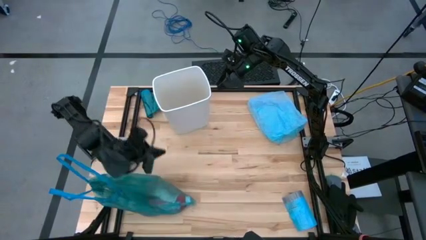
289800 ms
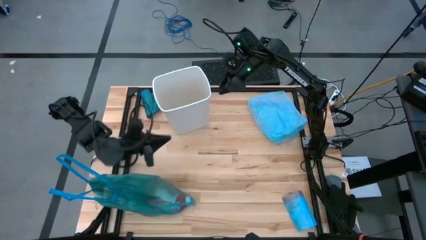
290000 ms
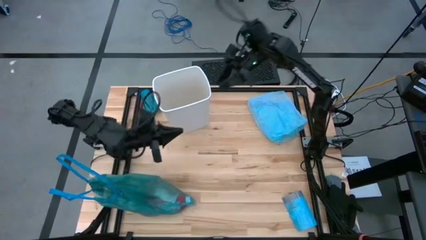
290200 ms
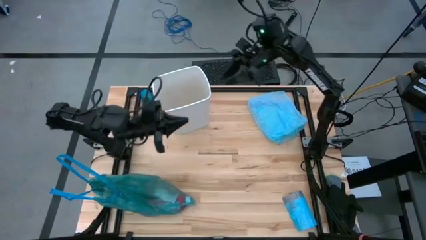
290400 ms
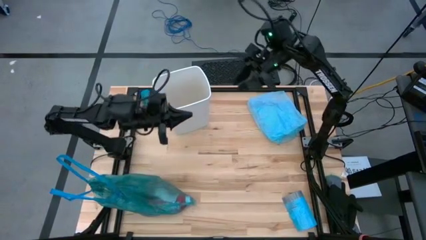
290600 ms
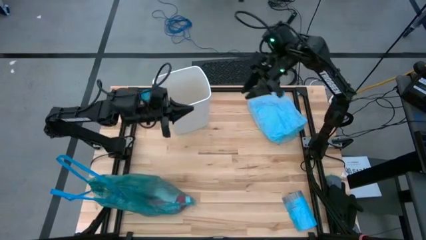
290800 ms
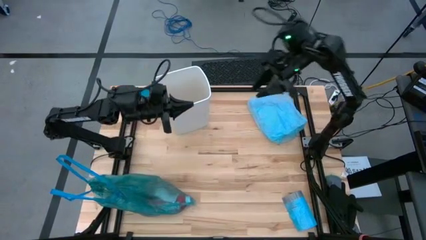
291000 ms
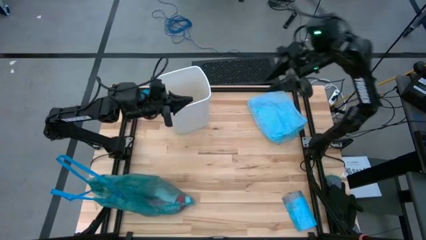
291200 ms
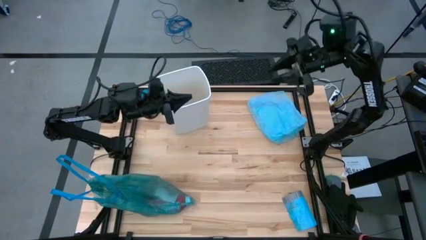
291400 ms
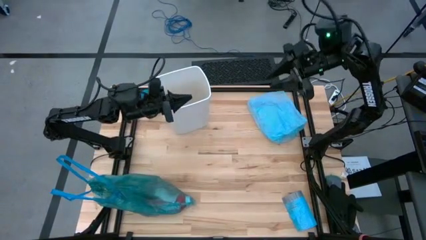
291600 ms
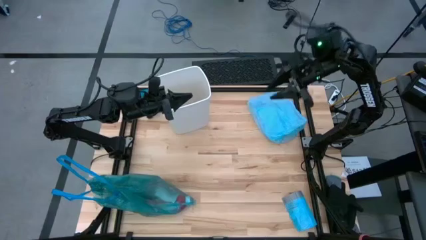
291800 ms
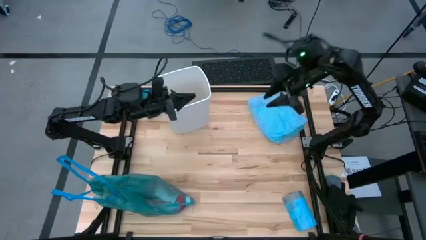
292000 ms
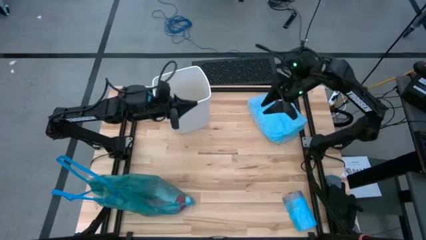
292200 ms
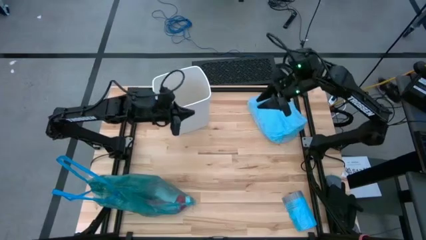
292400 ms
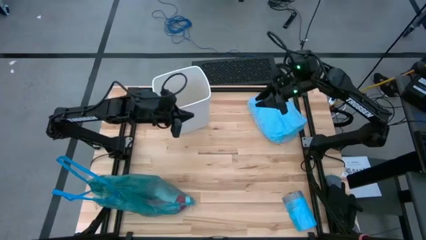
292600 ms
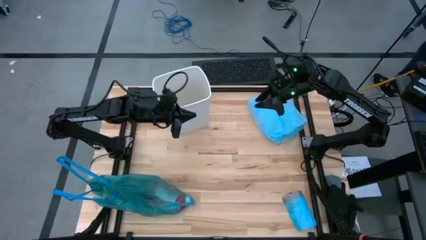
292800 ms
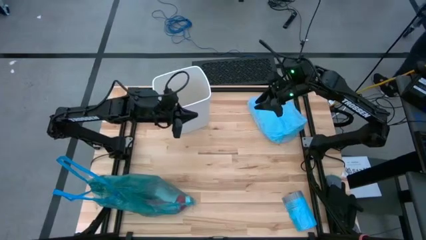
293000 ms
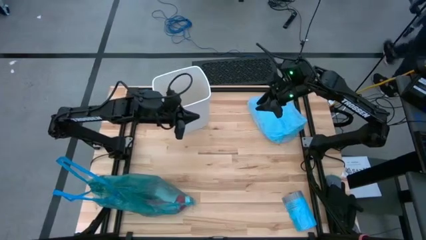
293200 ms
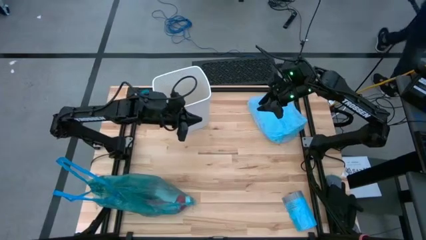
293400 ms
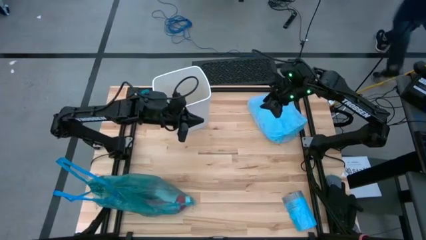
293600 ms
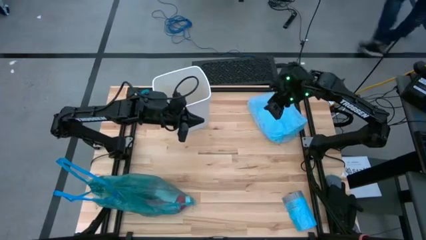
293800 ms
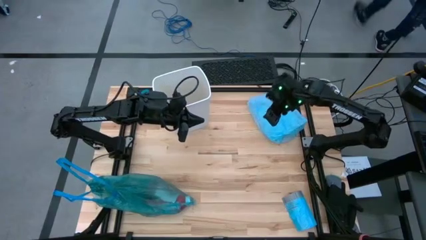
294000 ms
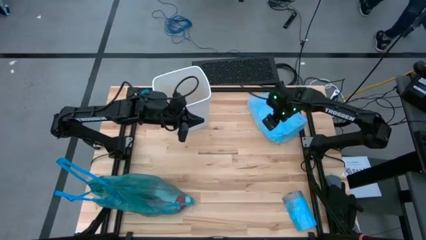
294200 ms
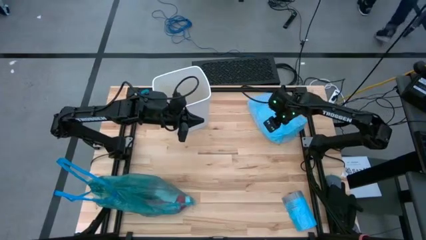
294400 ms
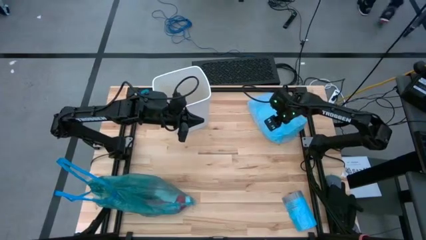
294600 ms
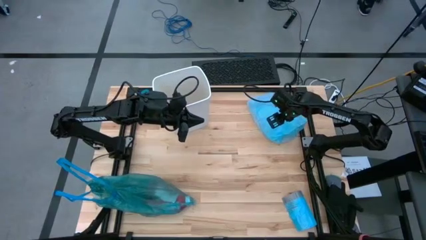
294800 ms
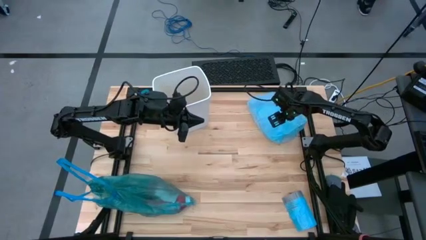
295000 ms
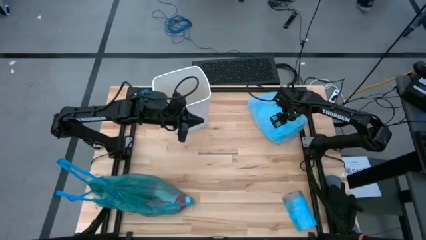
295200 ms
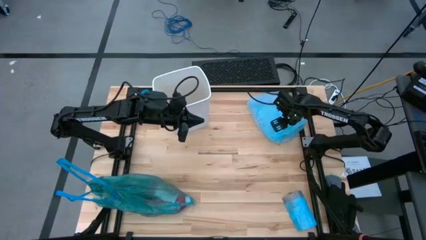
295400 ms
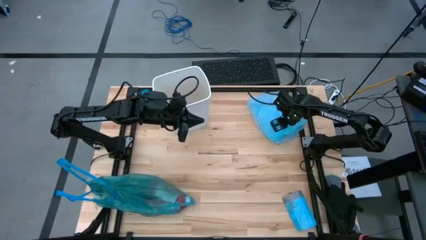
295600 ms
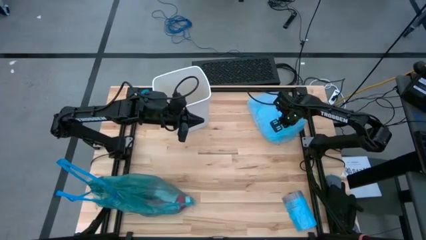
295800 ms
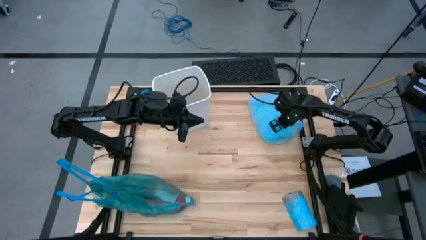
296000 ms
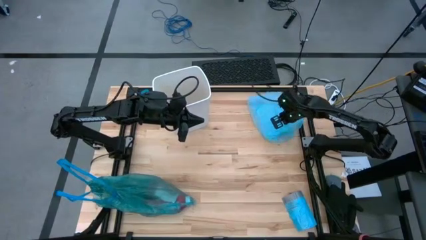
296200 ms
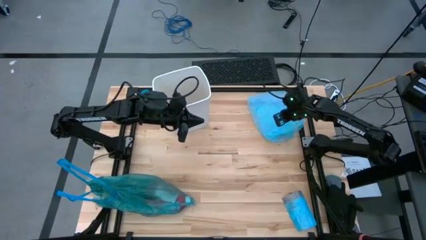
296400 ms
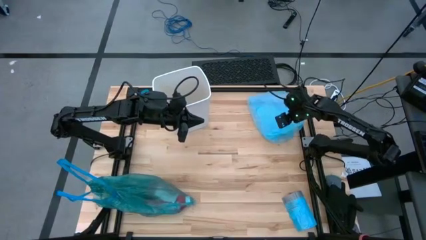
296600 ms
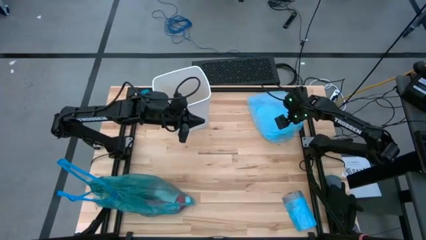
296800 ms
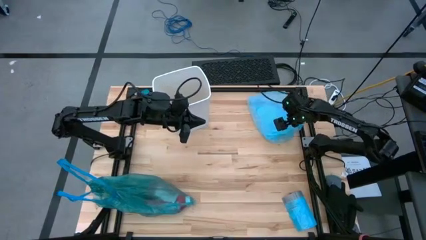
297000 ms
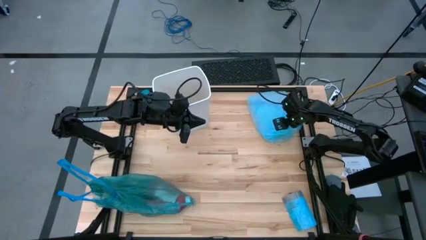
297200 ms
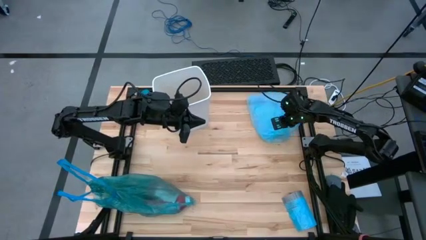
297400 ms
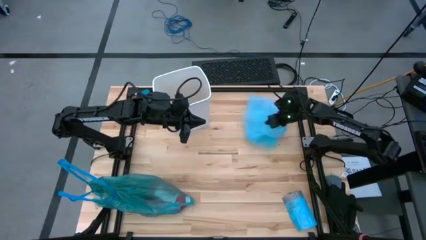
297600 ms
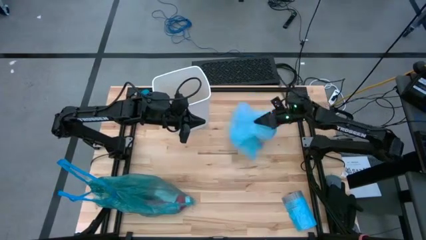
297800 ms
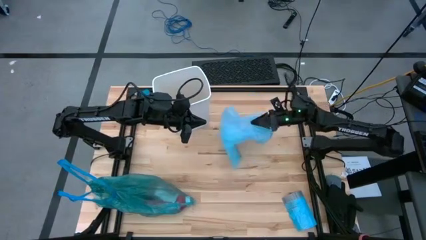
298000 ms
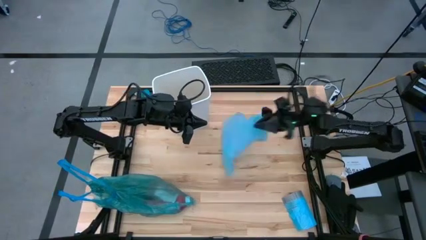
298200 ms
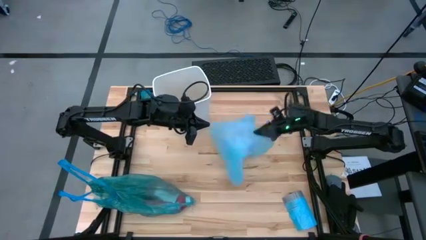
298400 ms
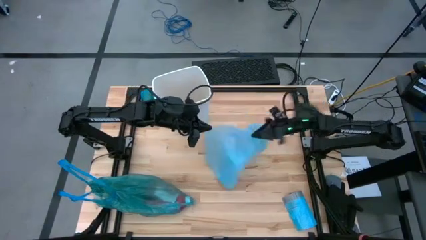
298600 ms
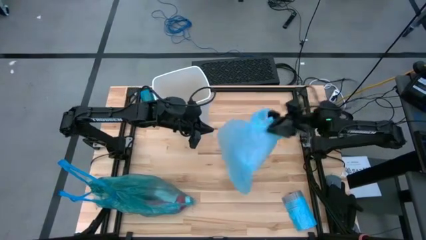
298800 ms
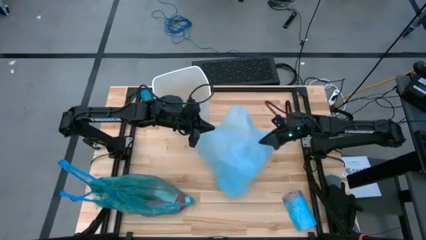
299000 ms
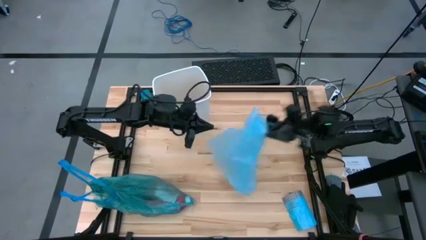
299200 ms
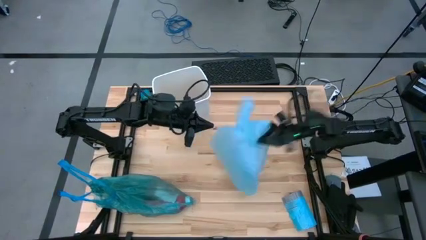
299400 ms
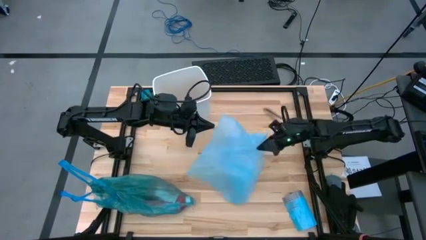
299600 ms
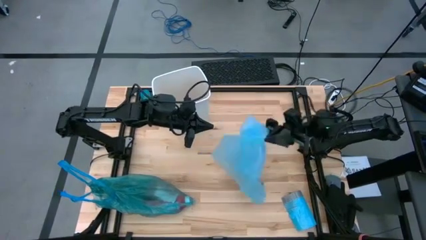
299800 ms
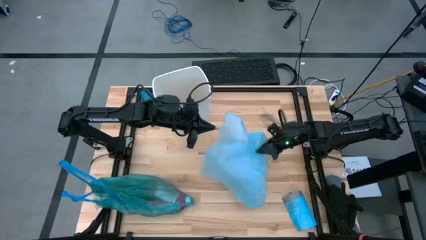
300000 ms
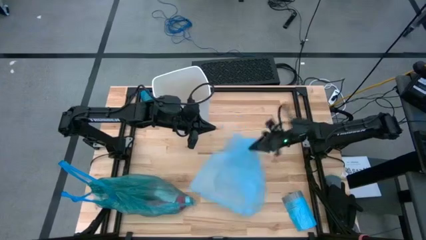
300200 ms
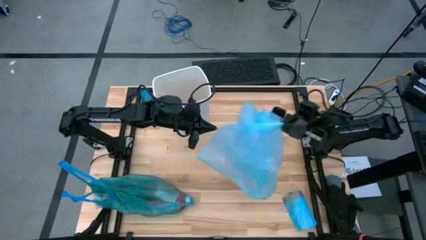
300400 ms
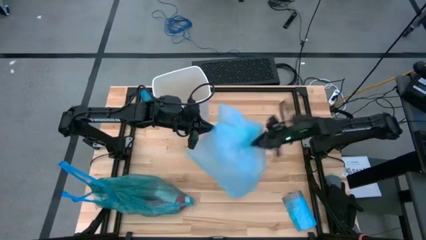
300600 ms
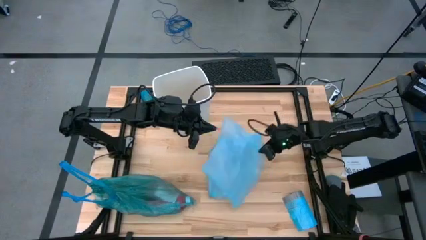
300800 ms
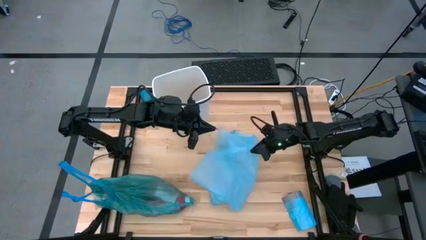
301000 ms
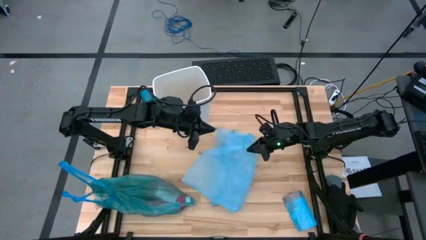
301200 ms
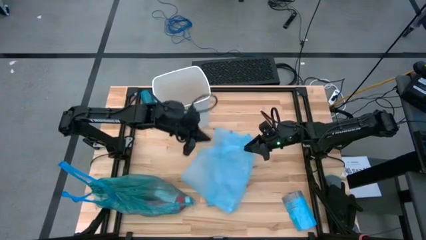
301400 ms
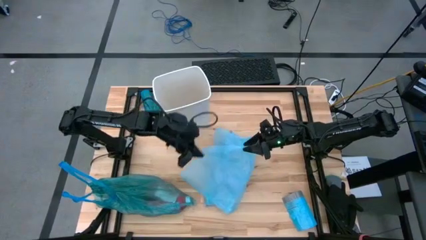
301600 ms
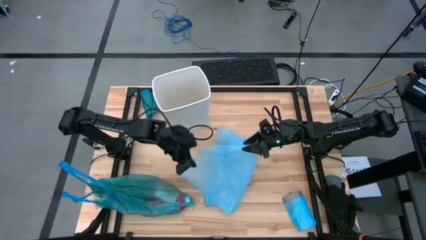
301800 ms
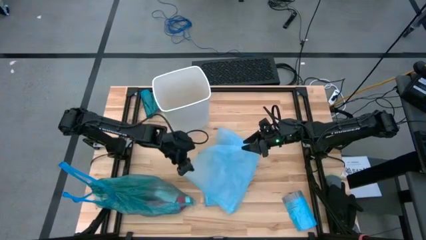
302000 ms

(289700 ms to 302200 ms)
Task: place trash/remove bag and relplace
Open the new blue trash bag

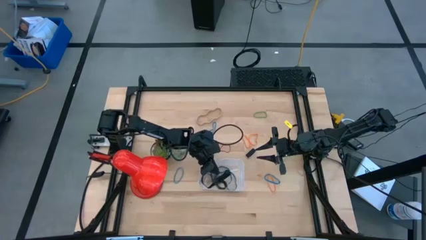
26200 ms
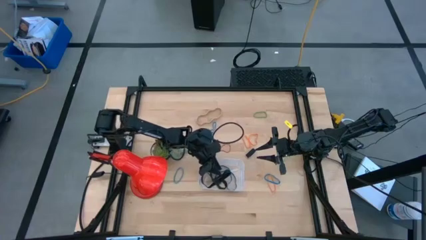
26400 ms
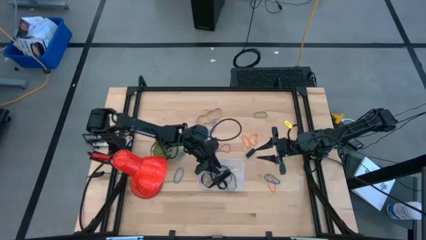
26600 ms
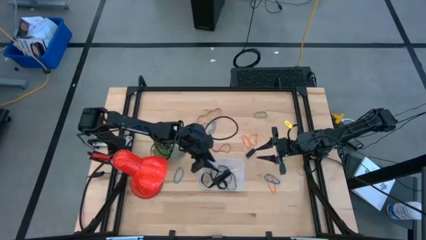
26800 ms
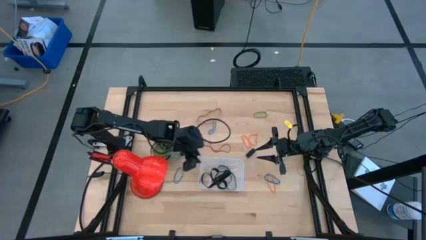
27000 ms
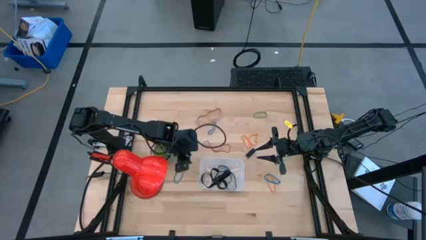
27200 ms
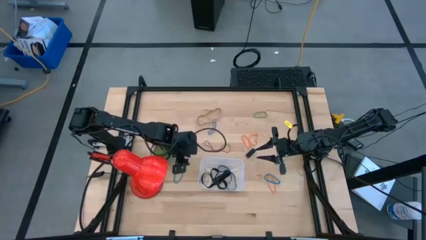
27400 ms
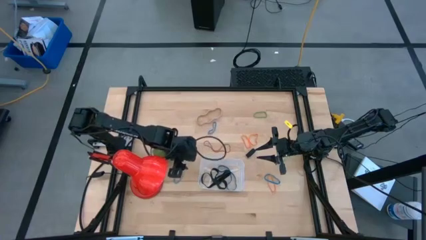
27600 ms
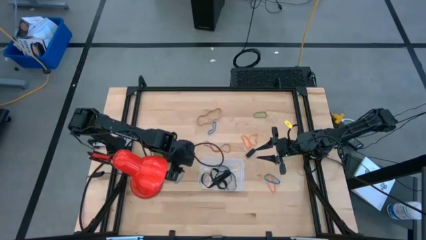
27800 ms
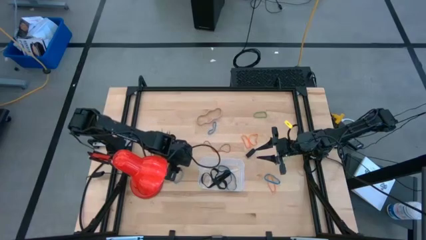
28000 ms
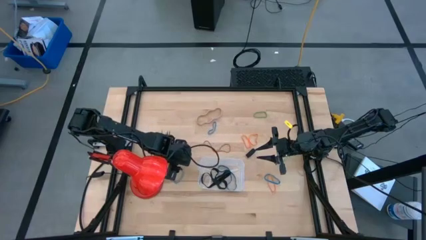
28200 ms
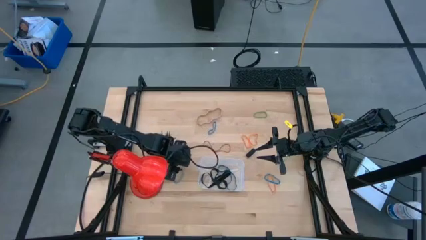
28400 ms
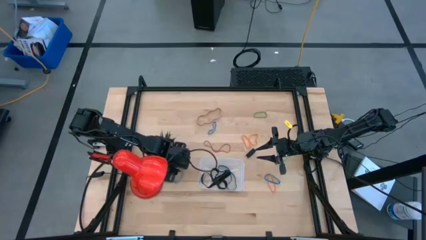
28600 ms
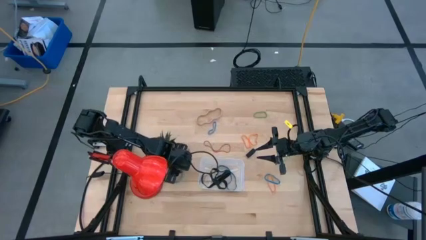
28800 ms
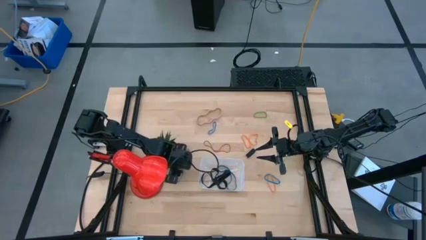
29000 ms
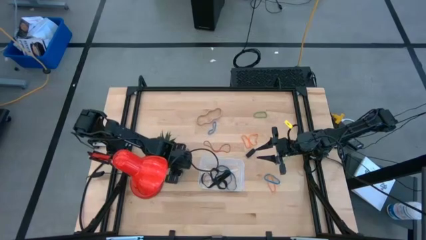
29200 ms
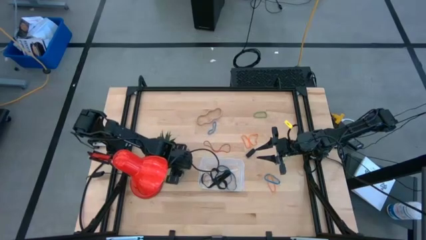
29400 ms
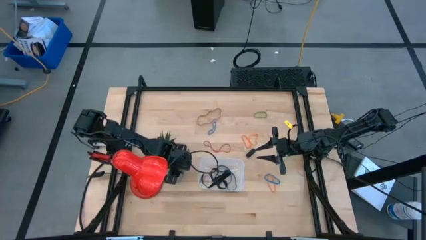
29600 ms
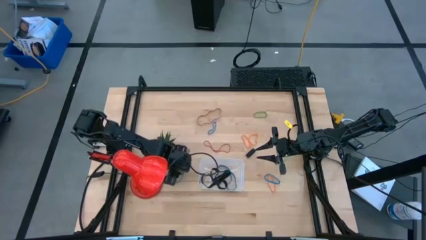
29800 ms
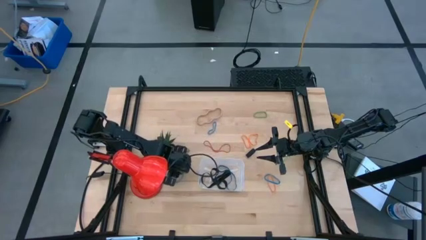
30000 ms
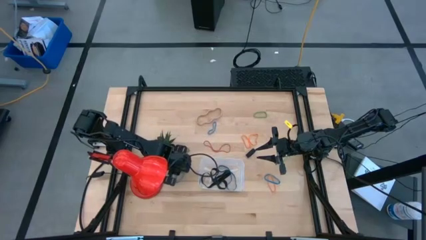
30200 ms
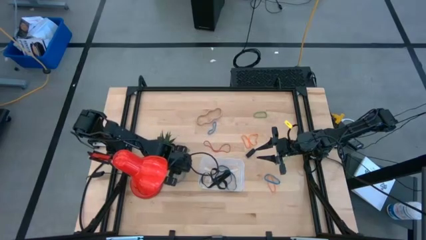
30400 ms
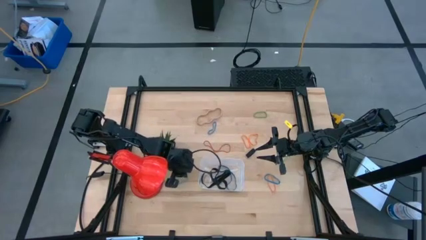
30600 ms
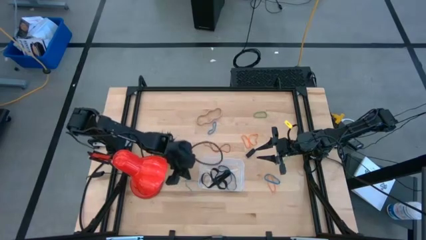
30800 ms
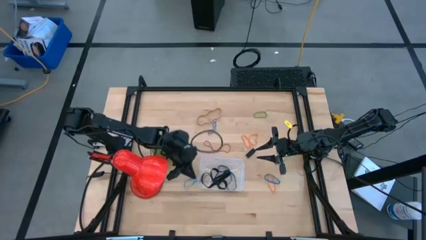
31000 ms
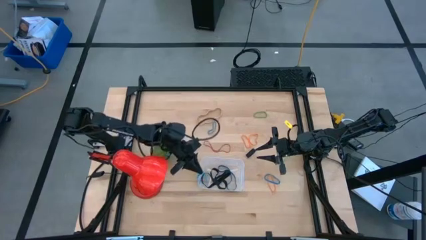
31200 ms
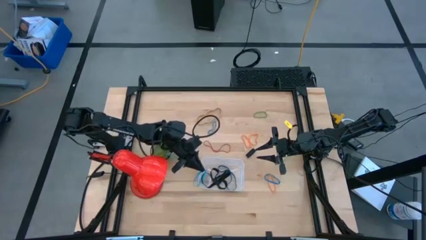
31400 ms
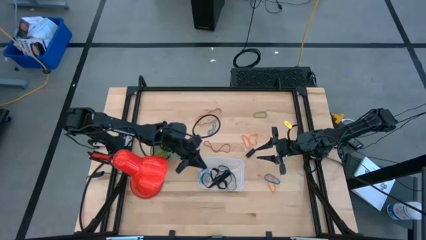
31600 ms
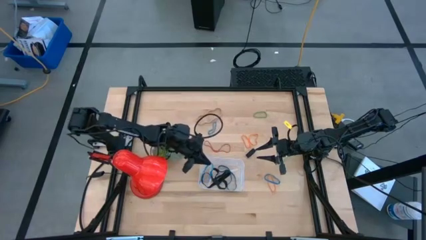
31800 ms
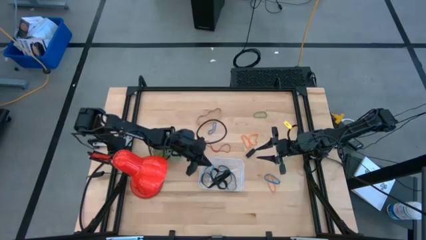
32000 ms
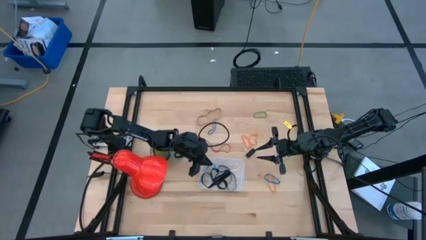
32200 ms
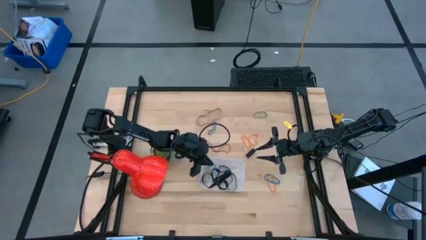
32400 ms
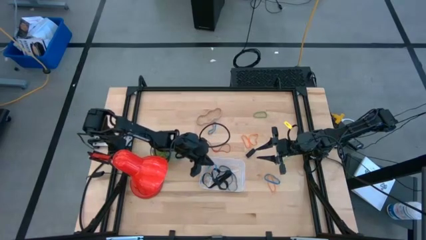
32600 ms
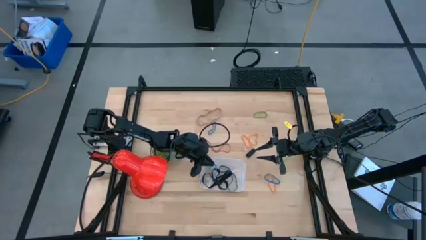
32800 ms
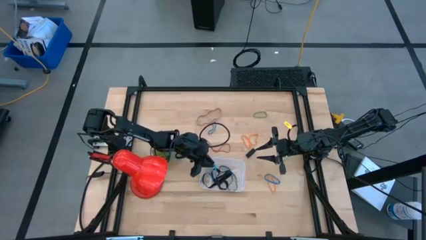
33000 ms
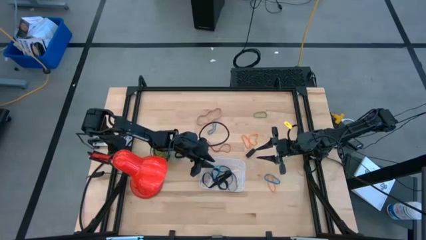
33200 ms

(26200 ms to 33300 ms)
Task: Pick and place rubber bands into bin
Put the bottom left blue rubber band into the bin
